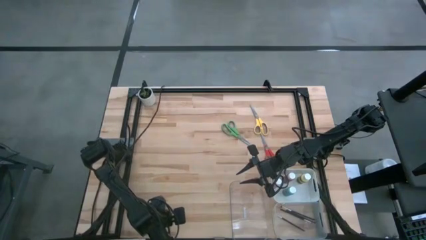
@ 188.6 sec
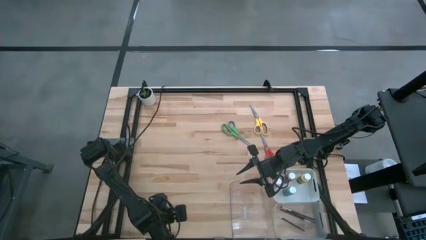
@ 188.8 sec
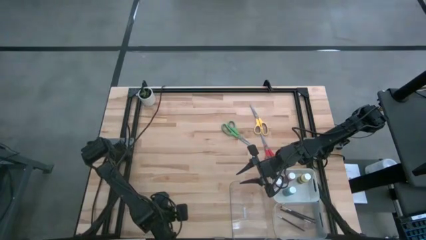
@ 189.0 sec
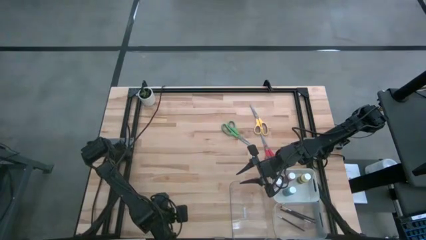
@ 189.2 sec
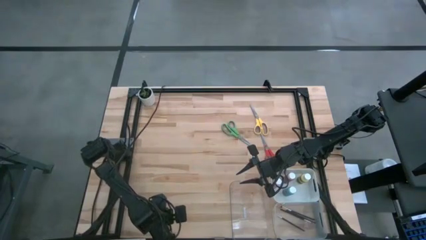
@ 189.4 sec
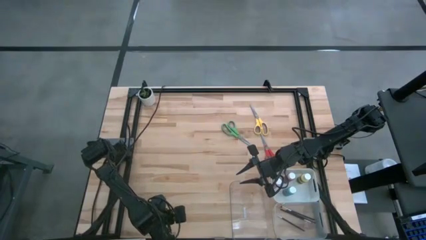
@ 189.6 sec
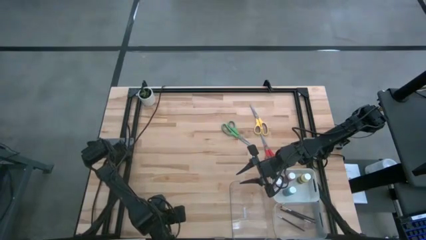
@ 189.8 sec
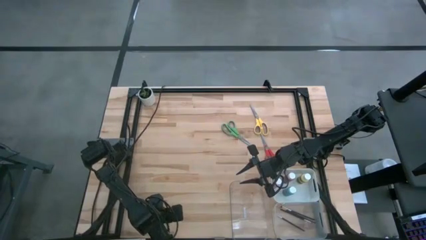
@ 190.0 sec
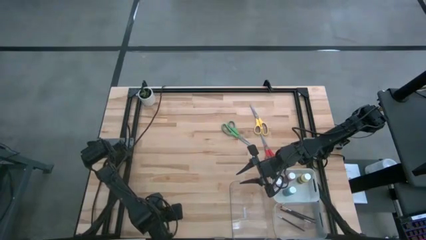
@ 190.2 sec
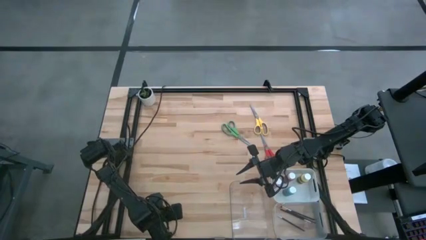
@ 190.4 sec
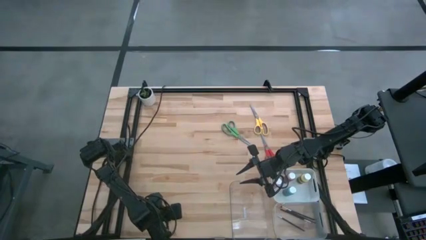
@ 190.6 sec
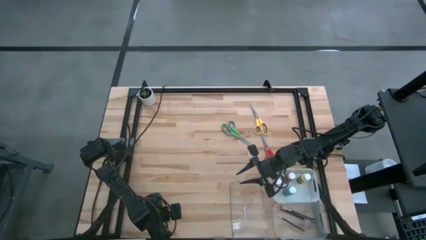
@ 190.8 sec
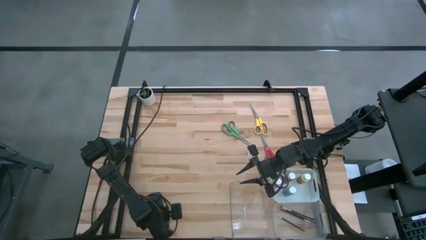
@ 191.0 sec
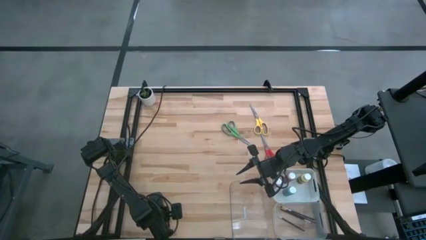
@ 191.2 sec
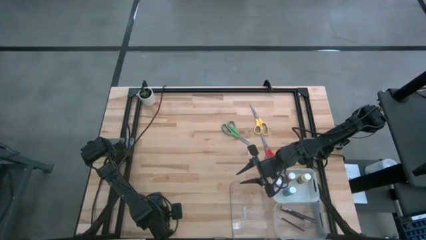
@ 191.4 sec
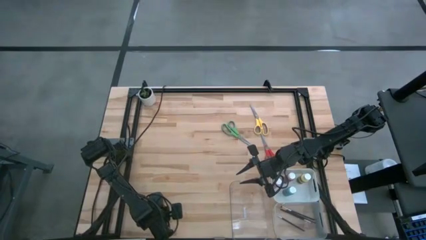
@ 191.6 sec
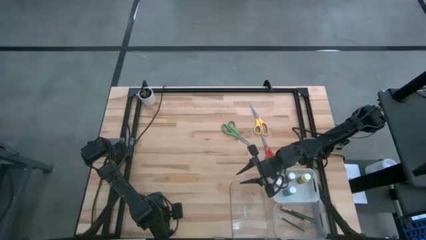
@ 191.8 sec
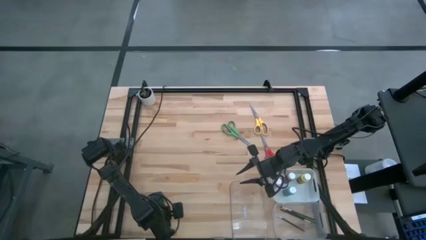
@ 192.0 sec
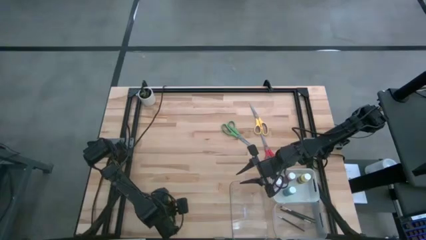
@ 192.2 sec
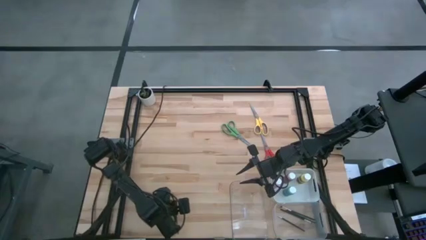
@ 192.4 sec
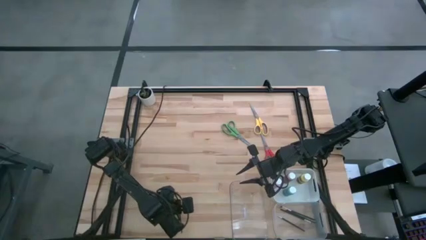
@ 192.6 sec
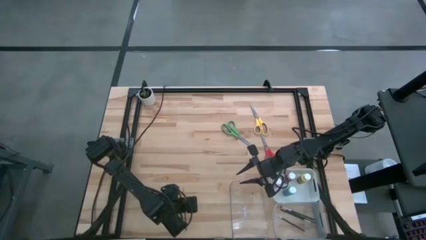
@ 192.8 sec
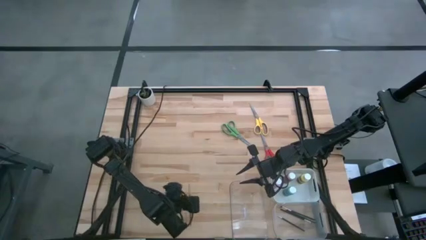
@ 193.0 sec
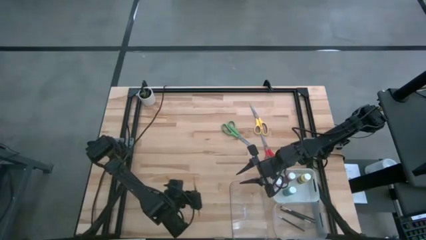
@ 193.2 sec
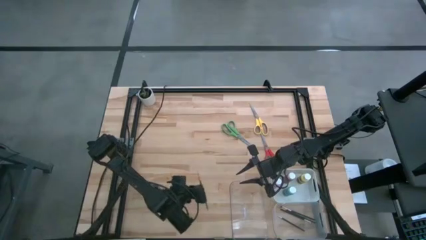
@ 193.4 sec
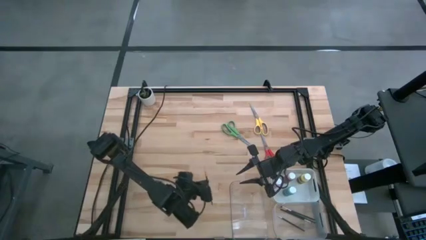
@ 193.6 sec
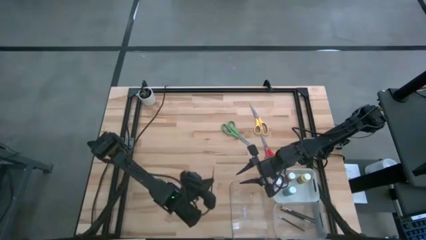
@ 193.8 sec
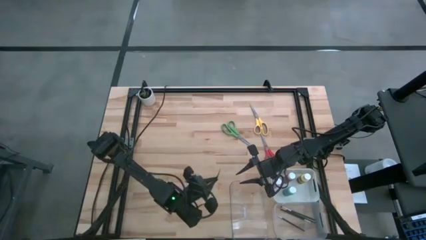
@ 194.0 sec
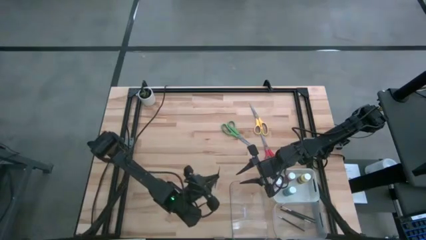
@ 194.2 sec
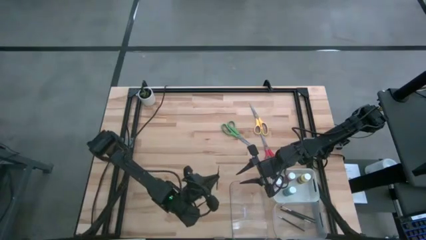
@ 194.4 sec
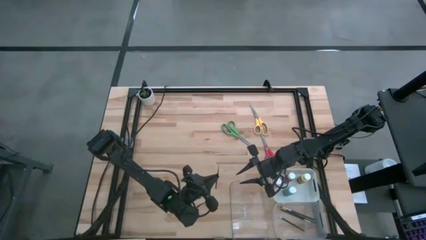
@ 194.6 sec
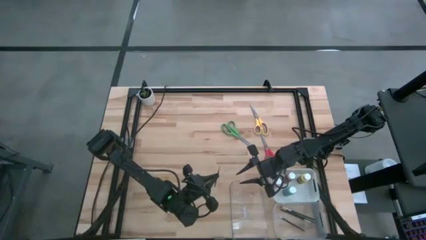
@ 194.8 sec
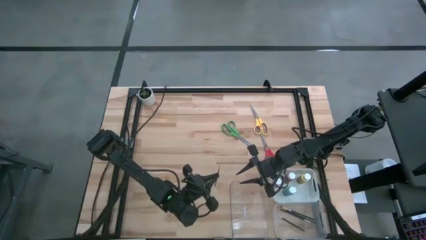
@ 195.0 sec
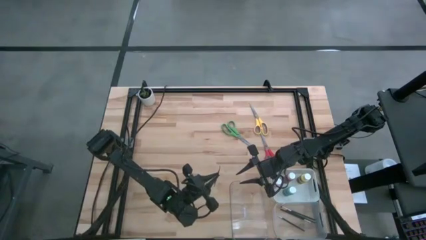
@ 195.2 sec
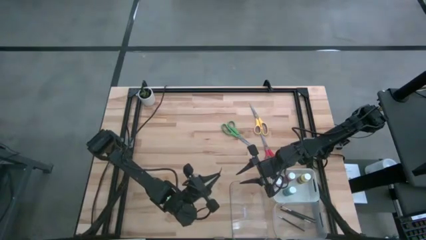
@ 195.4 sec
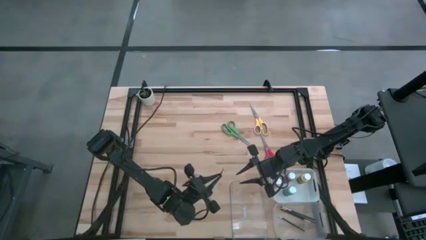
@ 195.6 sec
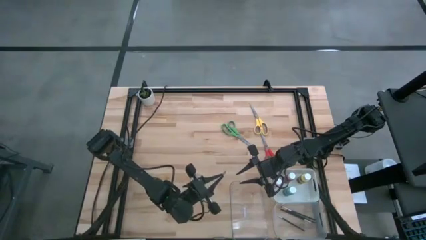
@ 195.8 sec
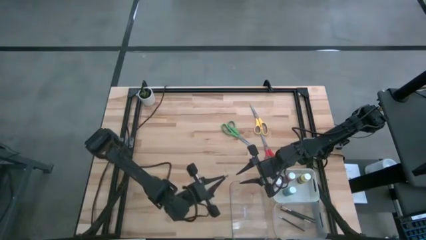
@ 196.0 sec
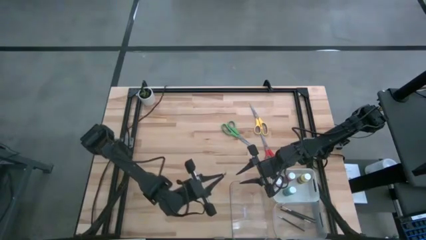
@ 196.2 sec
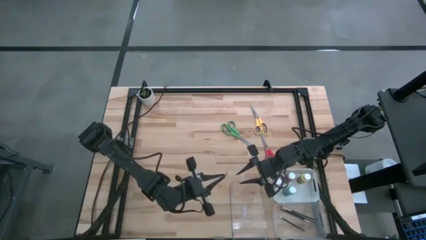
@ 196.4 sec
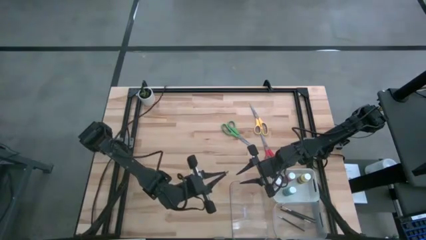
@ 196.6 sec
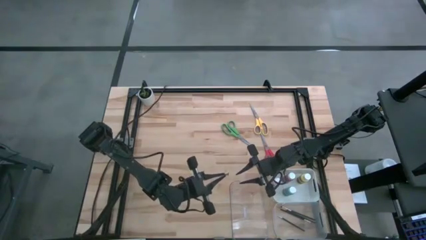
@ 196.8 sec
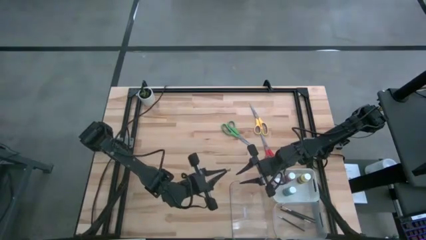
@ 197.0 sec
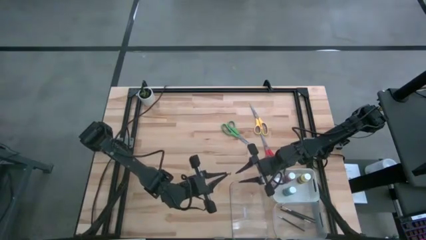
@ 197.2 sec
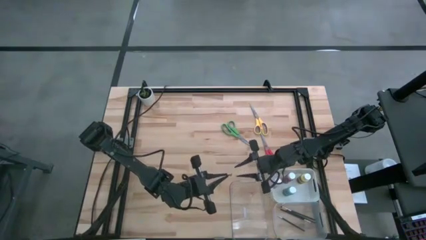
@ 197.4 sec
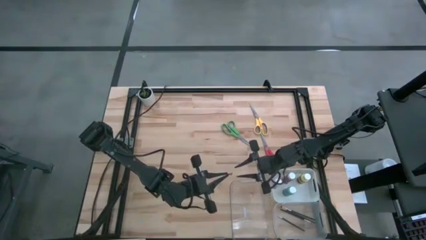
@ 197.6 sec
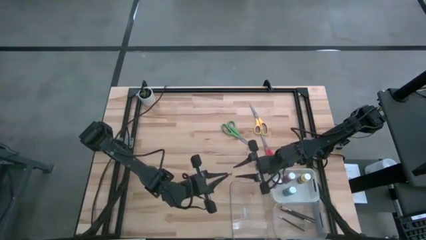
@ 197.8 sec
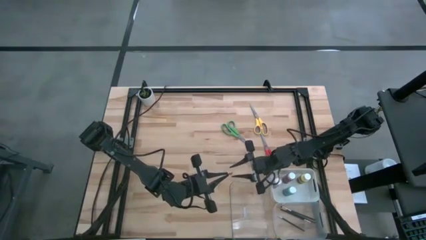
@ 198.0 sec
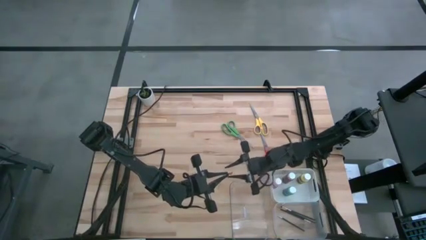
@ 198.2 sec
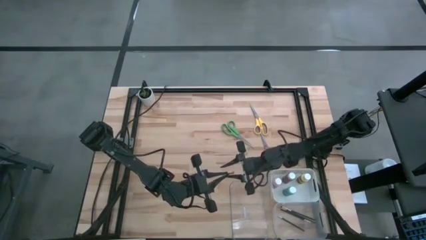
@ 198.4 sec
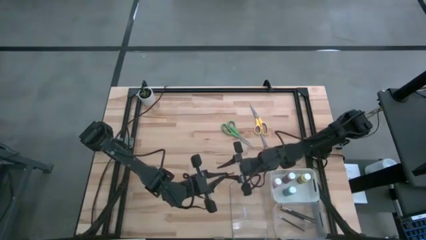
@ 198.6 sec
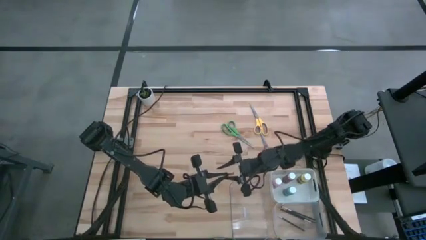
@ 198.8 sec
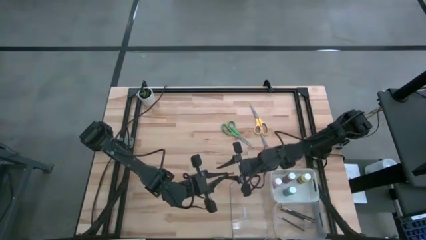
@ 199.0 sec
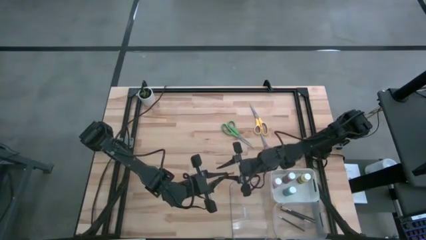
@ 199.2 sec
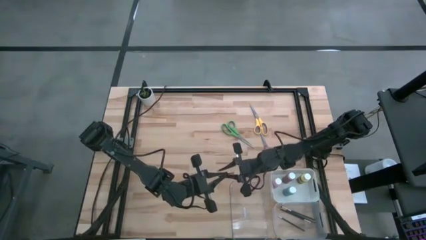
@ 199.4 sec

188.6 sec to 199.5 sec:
Task: Pick & Place Paint Supplies
Put the gold paintbrush into the right transparent bin

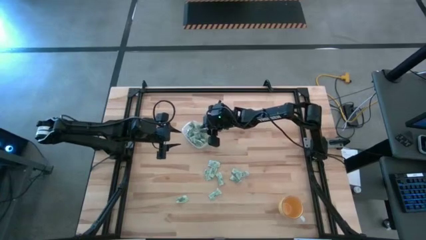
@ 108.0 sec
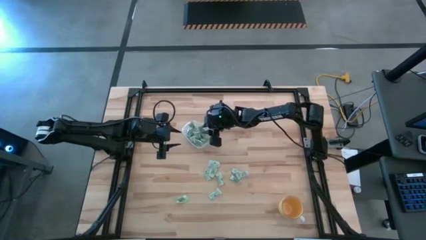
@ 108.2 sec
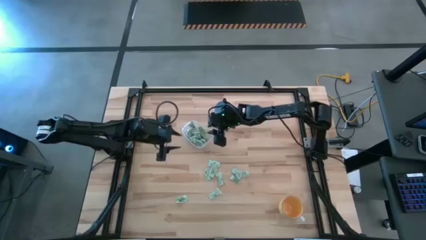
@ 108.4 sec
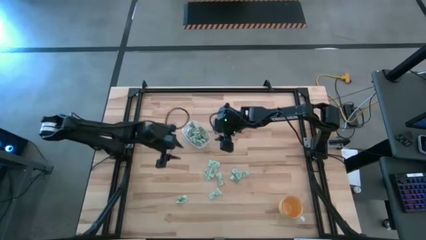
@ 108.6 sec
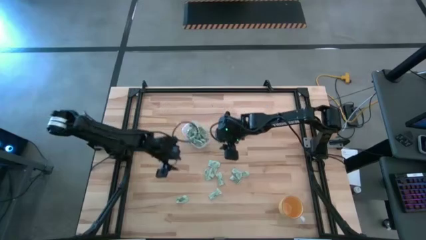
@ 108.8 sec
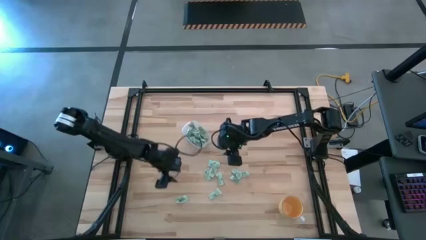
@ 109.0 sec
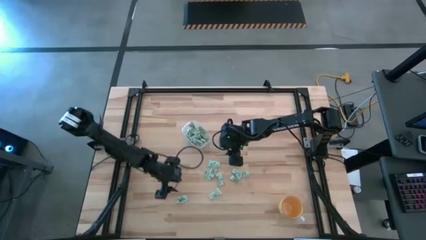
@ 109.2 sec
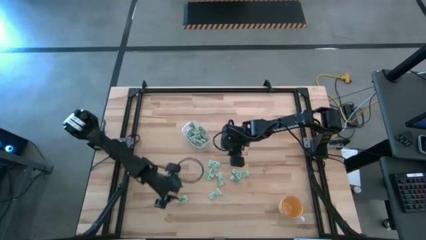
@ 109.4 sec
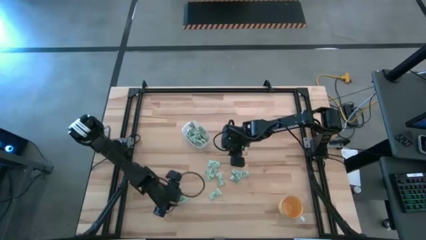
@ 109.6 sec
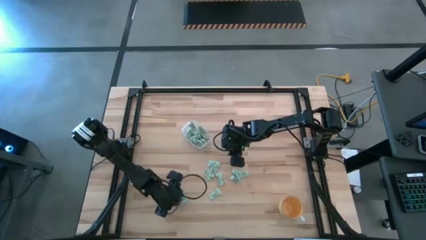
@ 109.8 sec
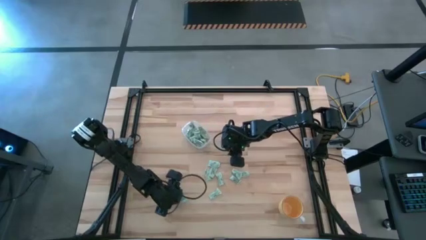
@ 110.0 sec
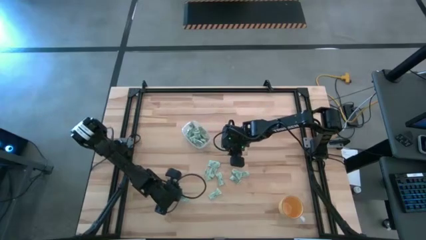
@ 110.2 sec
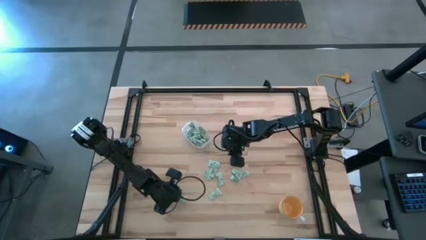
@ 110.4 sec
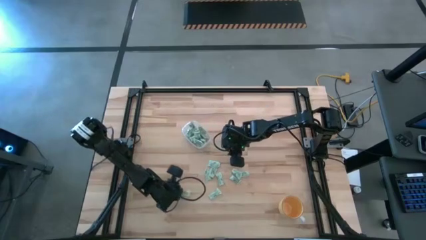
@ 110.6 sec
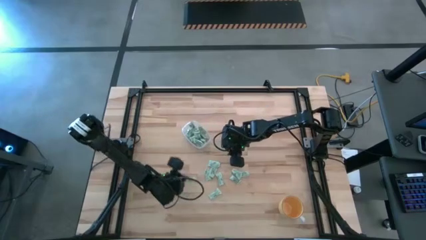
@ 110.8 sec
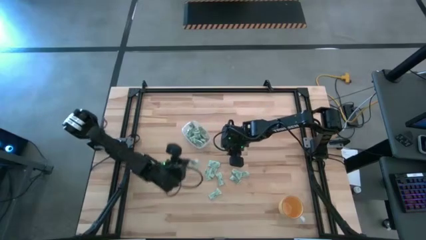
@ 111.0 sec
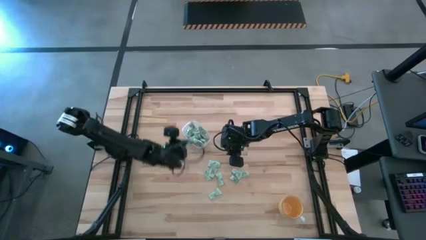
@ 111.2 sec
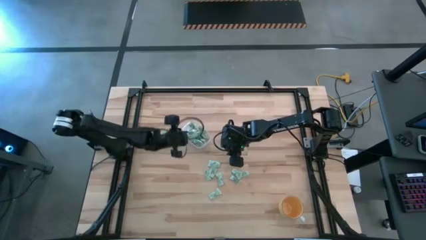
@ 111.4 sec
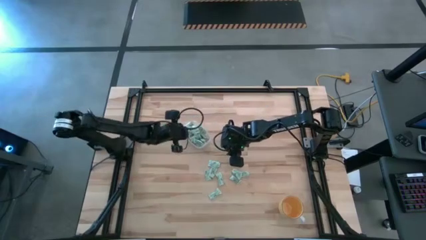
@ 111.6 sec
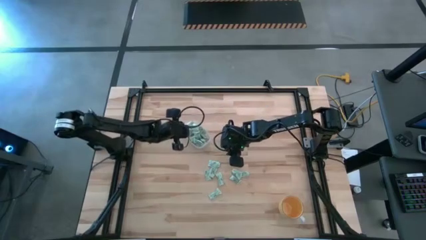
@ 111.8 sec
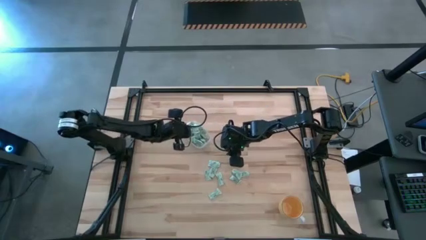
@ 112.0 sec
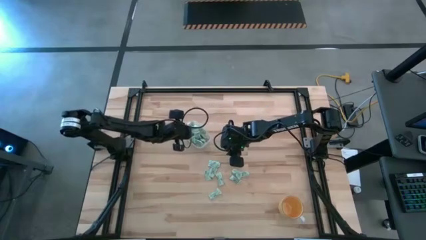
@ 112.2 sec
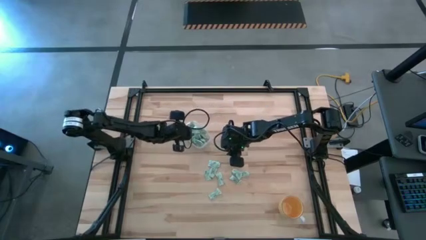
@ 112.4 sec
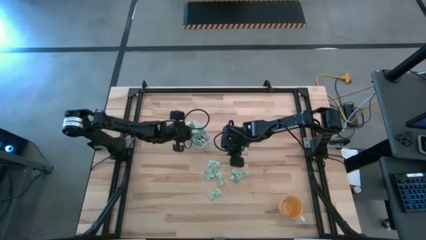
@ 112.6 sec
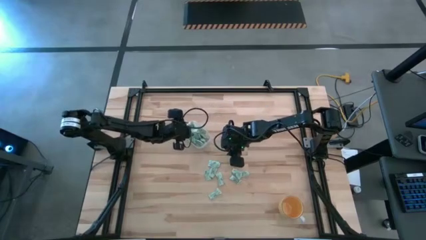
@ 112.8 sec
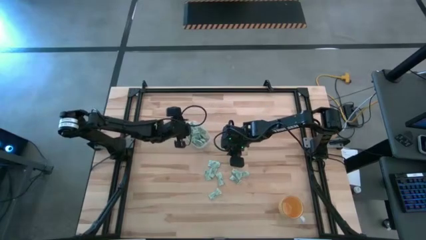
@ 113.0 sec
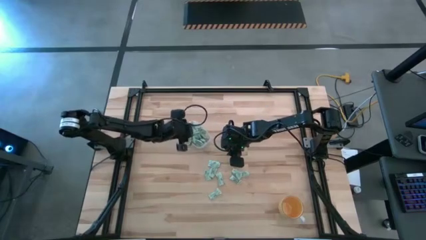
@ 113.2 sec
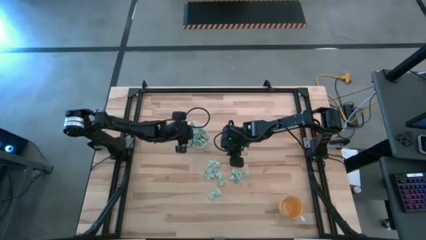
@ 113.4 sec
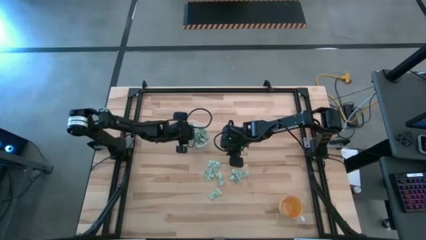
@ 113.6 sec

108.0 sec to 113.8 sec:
Task: Pick and place Stevia / Truvia into bins
Put the stevia packet into the transparent bin
